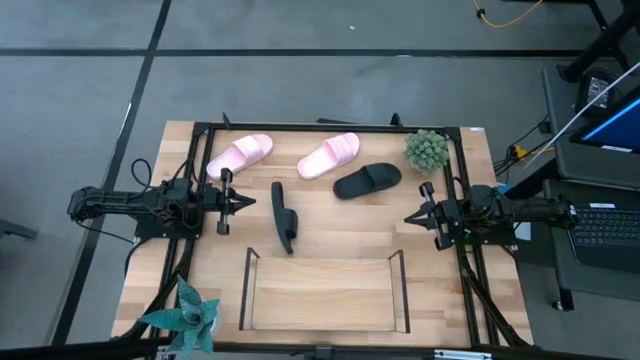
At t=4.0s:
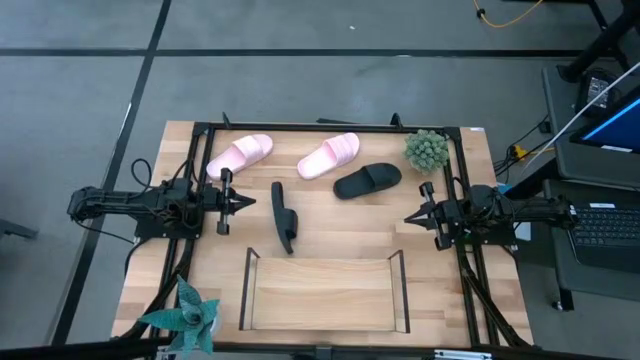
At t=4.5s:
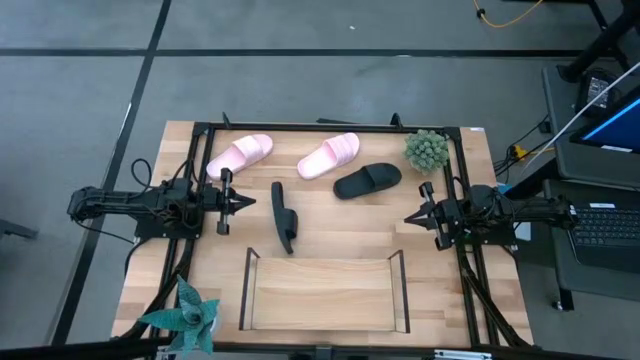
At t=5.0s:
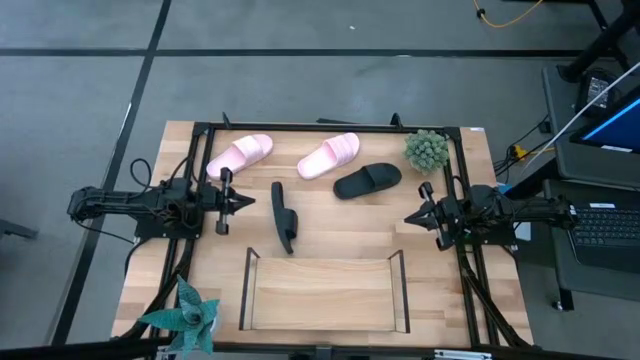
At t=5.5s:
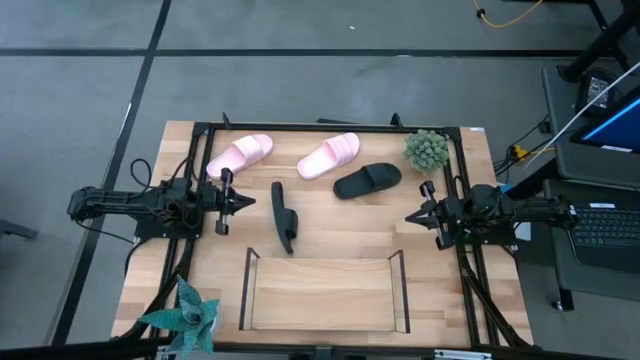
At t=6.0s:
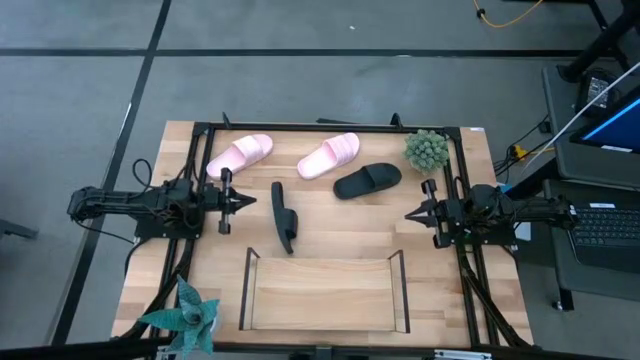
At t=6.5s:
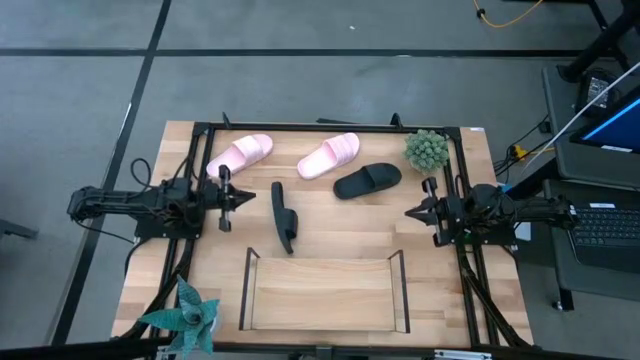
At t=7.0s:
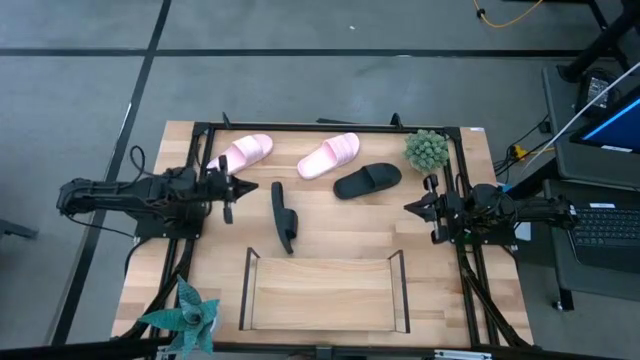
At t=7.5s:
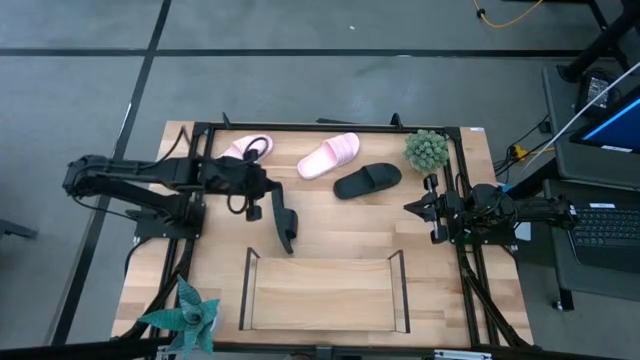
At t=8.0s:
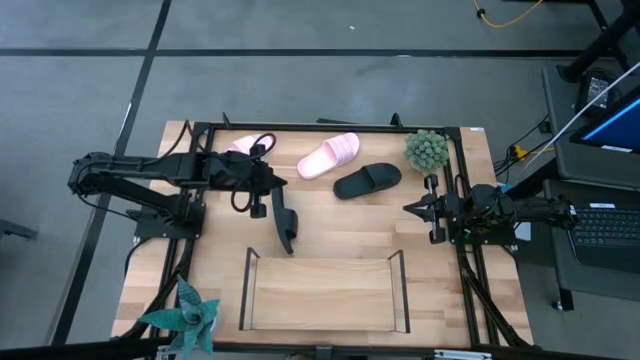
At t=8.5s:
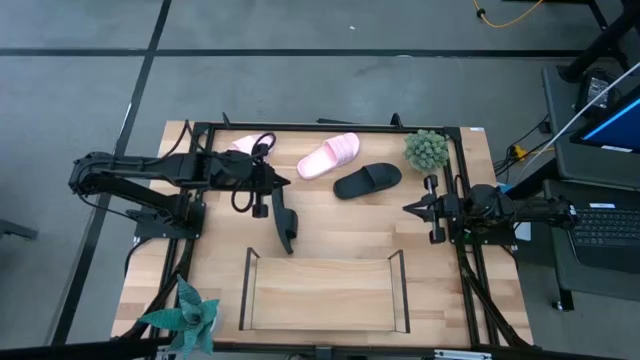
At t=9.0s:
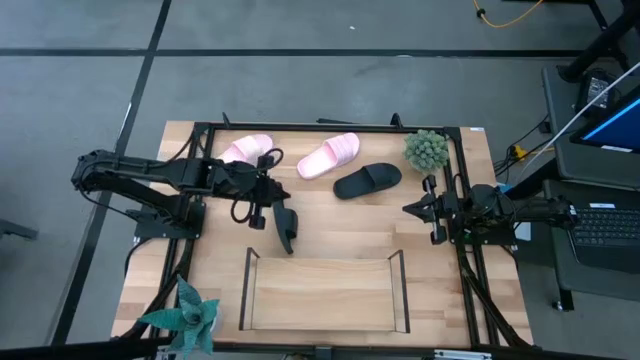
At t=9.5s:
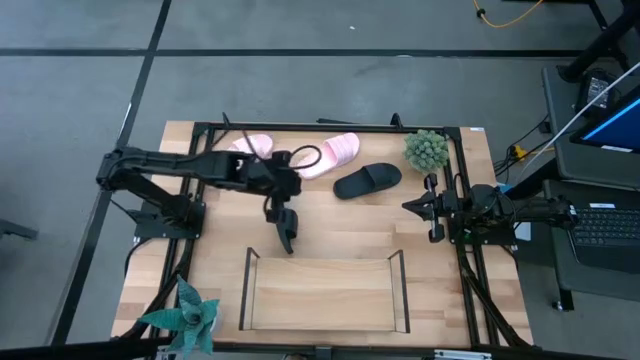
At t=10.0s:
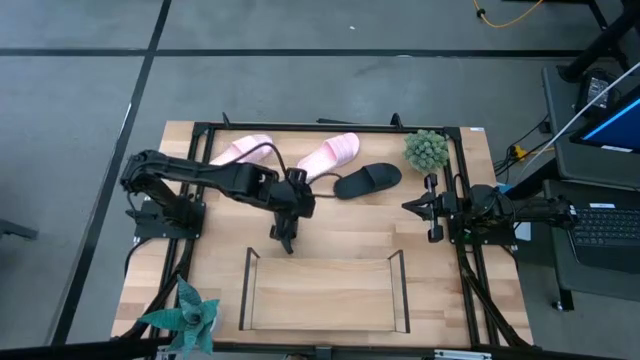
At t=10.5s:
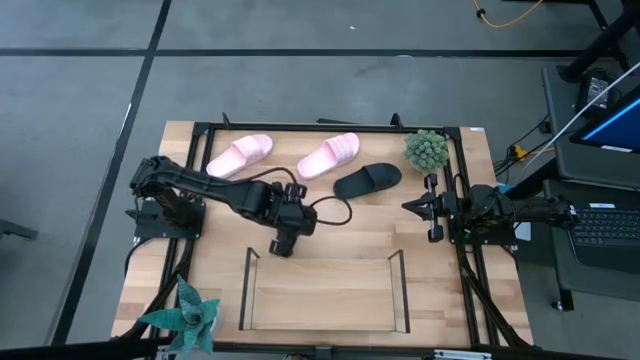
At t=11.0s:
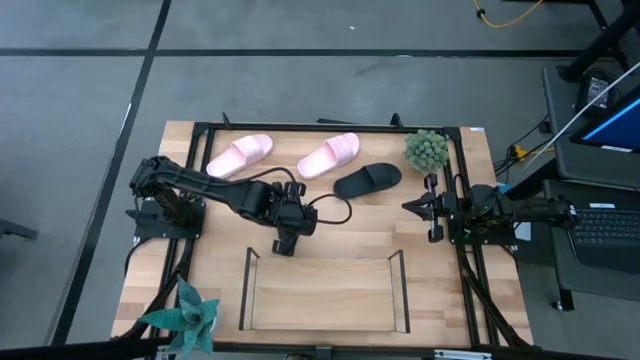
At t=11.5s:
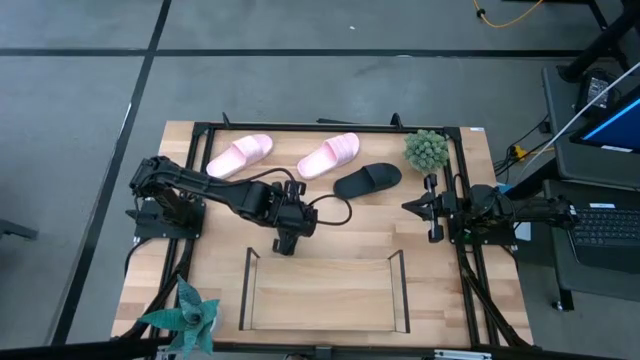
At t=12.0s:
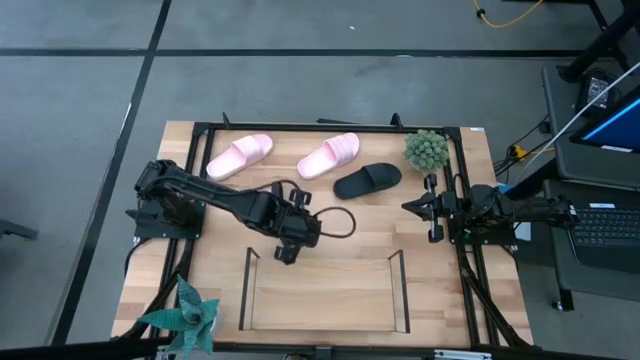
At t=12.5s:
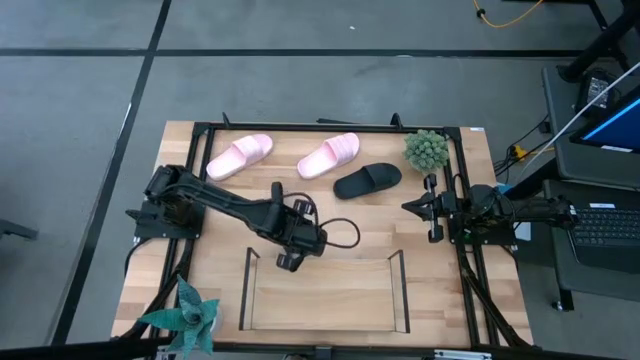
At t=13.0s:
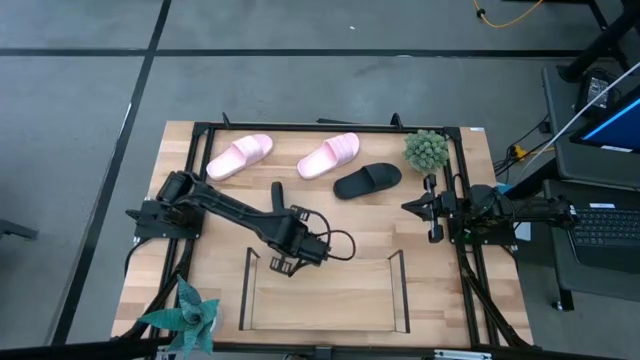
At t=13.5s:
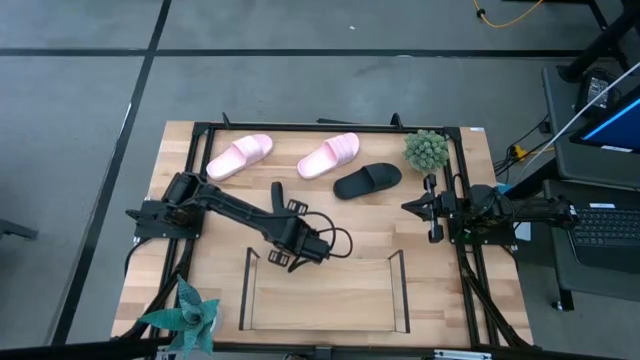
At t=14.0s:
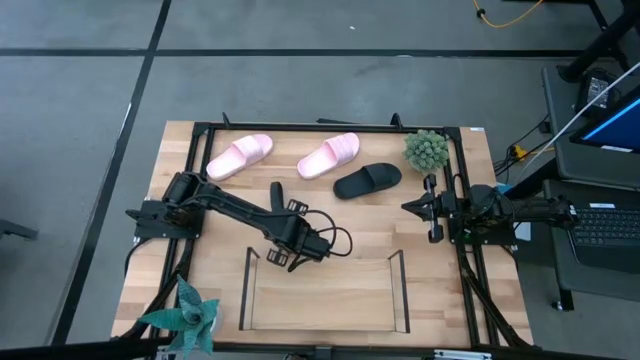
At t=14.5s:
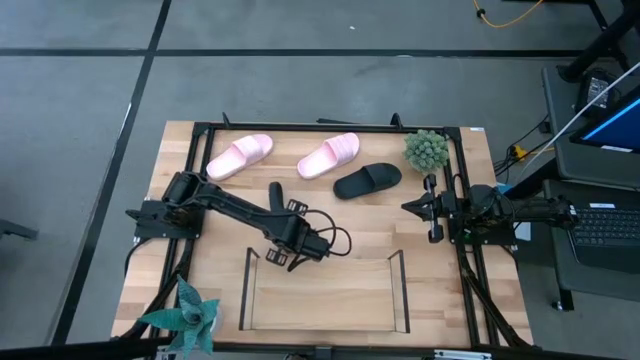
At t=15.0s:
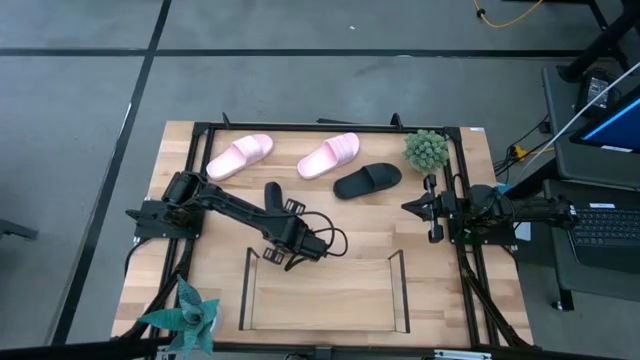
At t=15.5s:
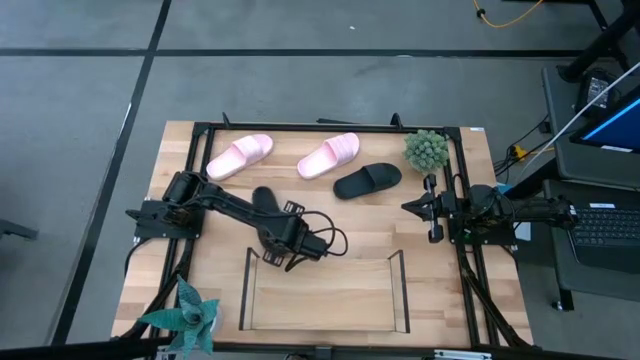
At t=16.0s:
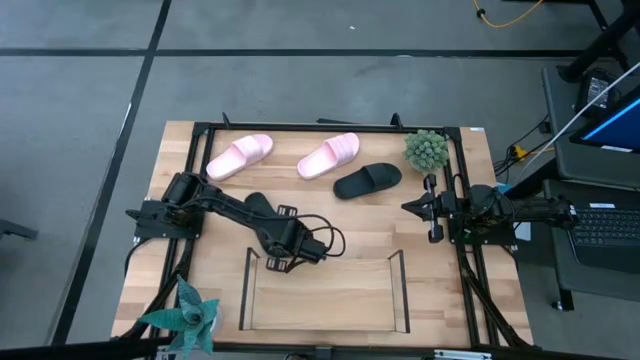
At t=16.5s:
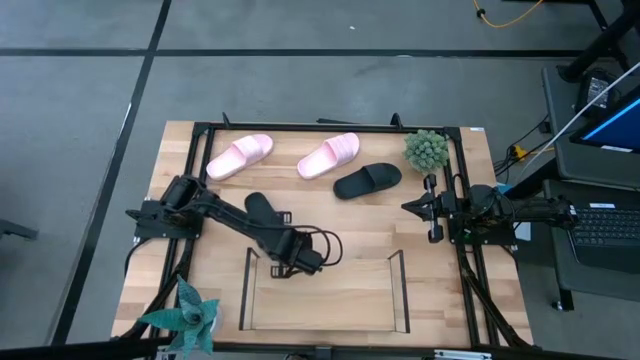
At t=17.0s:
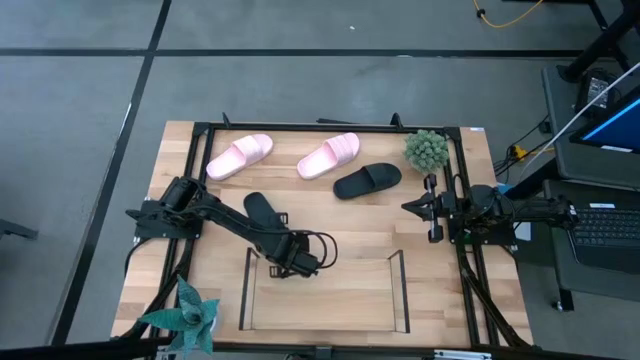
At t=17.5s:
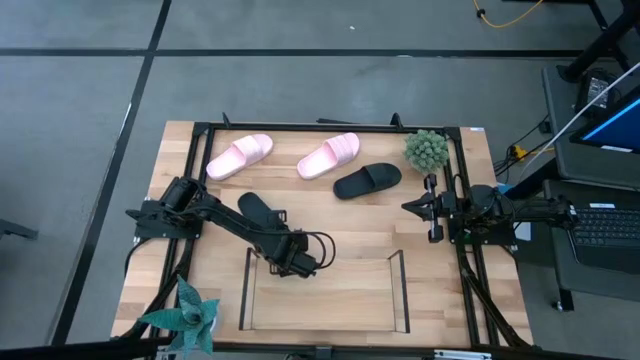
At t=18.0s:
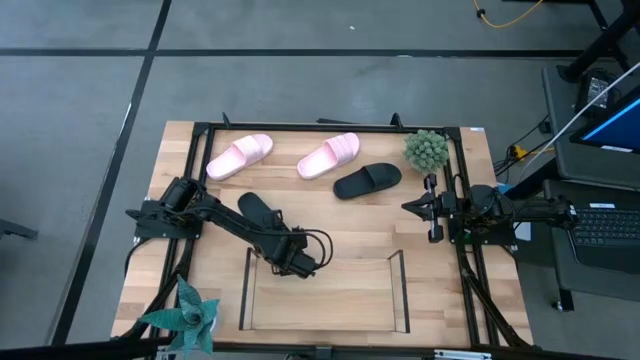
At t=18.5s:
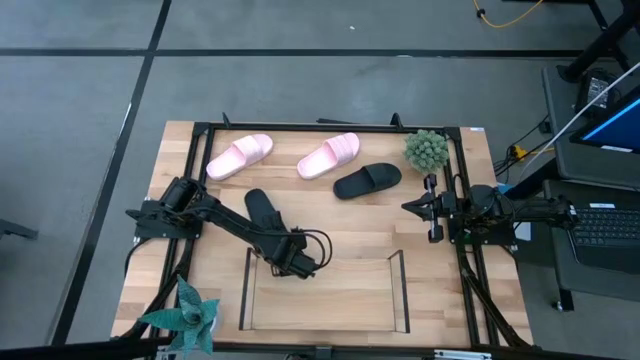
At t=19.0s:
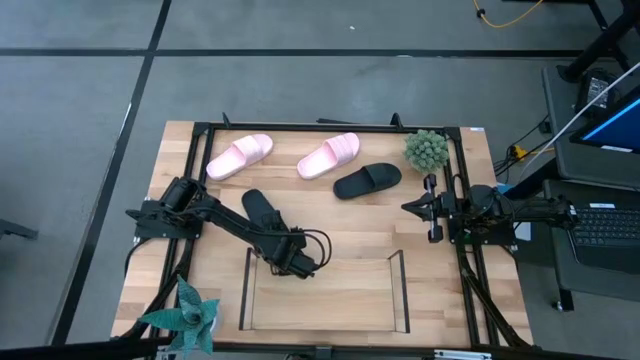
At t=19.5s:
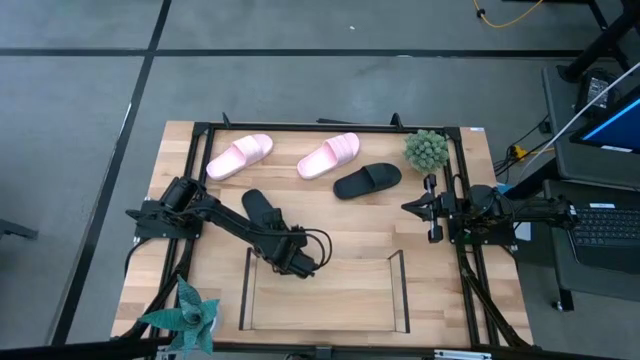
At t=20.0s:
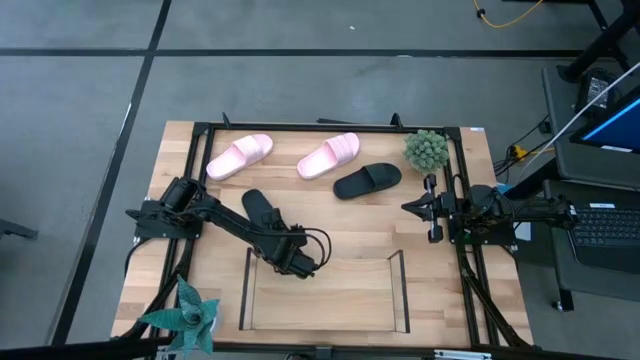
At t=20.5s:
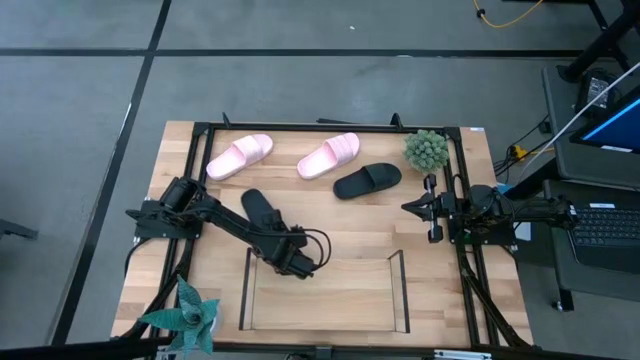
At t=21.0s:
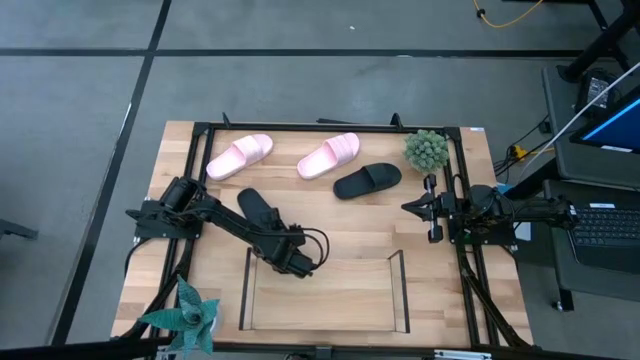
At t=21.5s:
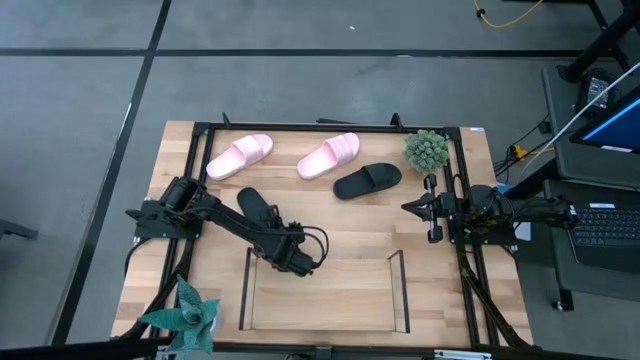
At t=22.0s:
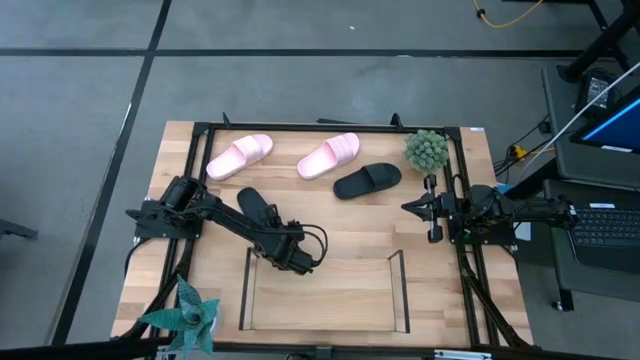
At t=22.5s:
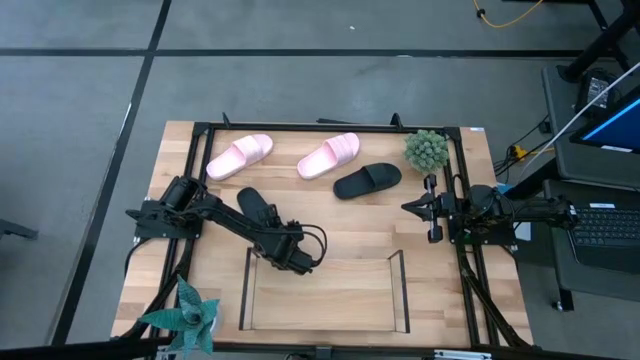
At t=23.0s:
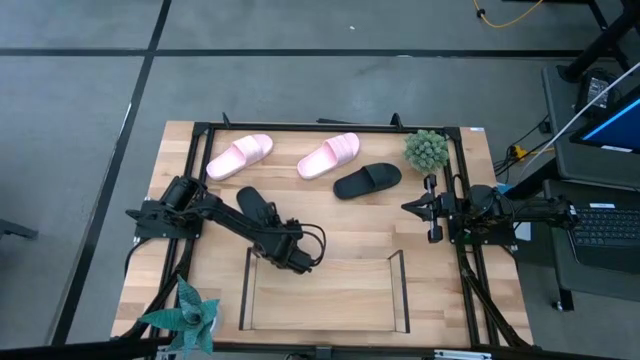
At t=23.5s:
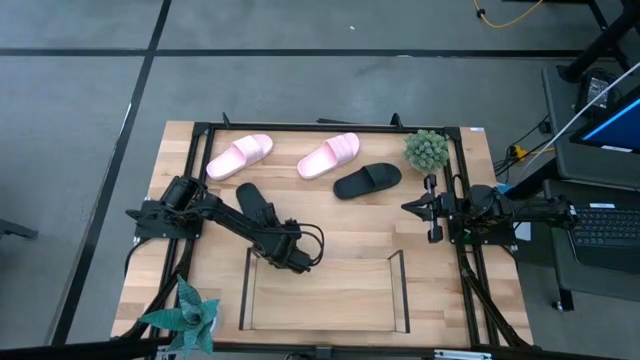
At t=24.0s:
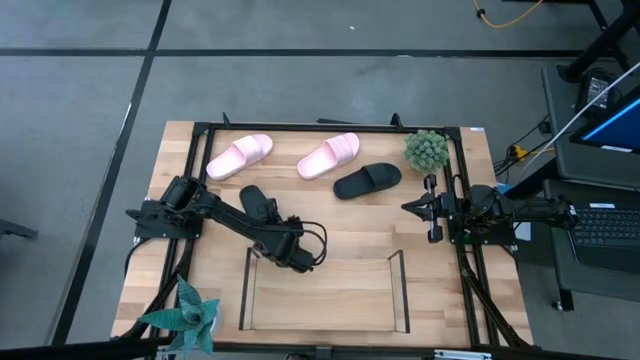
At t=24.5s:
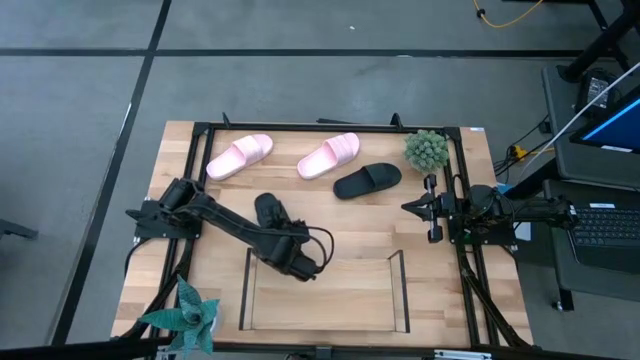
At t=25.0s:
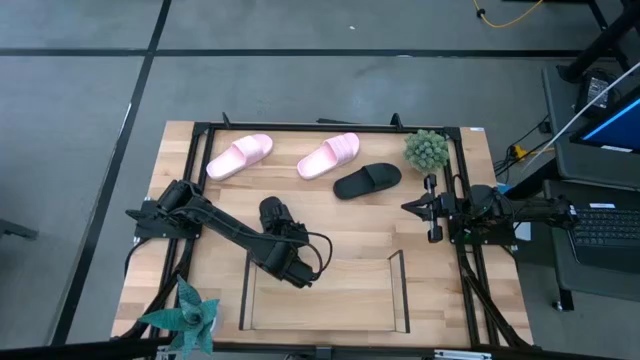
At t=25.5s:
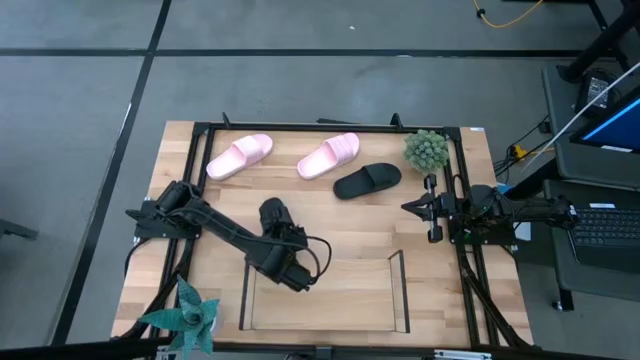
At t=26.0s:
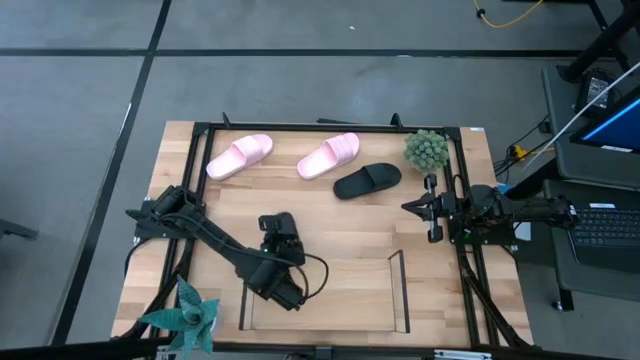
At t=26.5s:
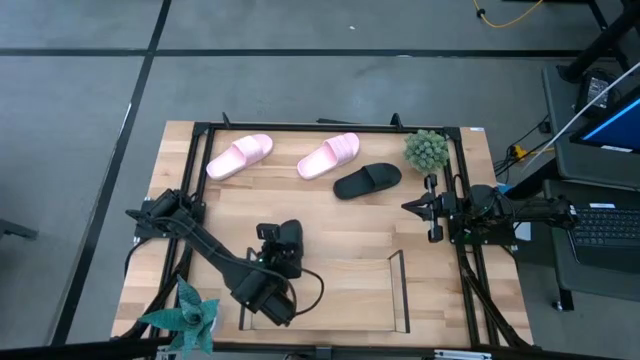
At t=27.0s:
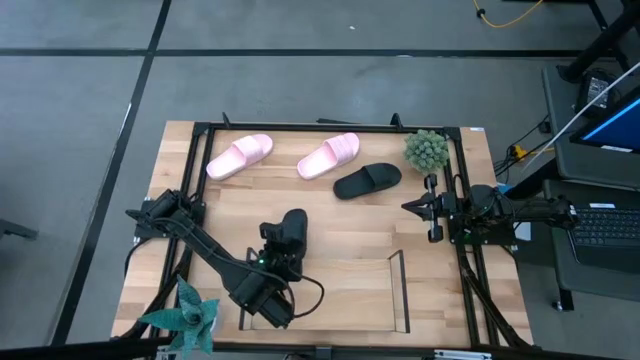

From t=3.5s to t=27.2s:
Task: Pick and place slides into the shelf
Put the left black slide on the shelf
